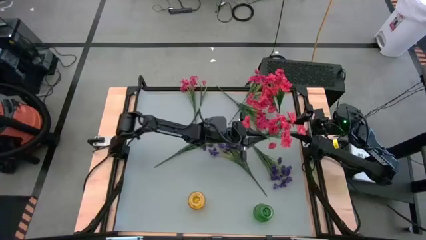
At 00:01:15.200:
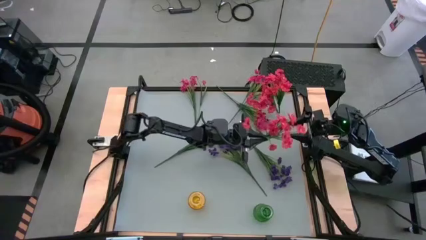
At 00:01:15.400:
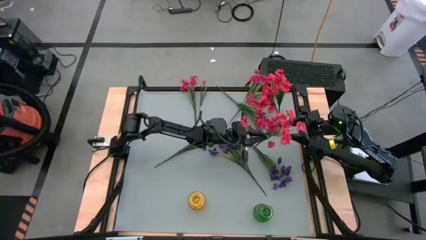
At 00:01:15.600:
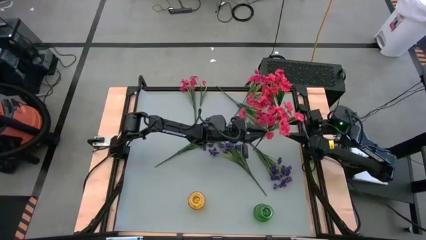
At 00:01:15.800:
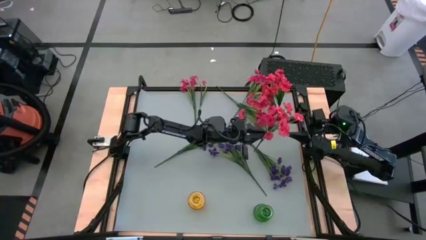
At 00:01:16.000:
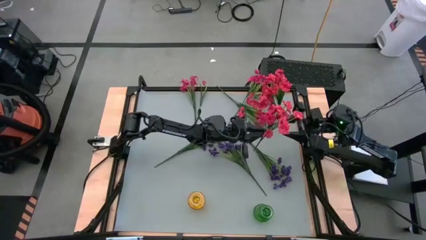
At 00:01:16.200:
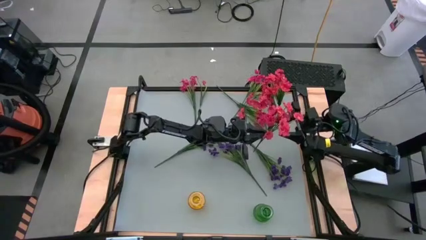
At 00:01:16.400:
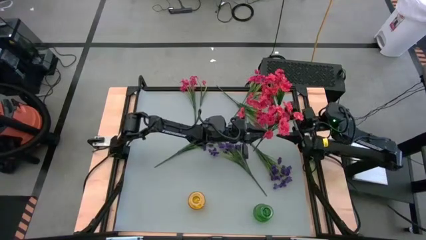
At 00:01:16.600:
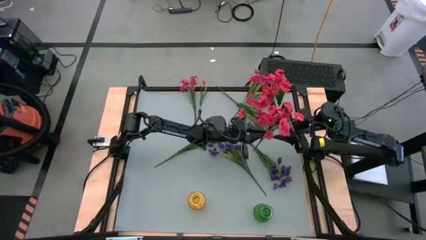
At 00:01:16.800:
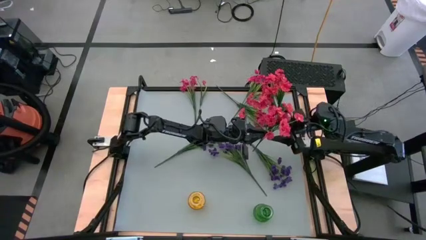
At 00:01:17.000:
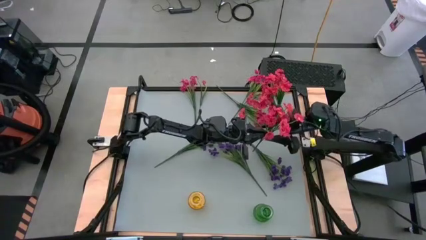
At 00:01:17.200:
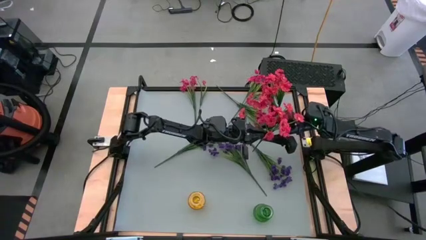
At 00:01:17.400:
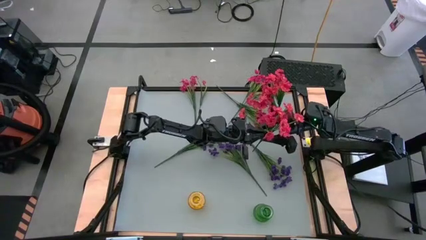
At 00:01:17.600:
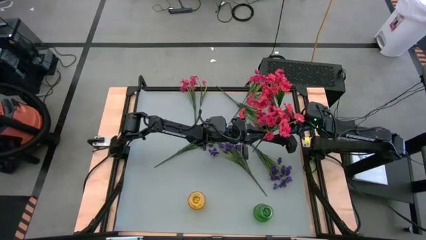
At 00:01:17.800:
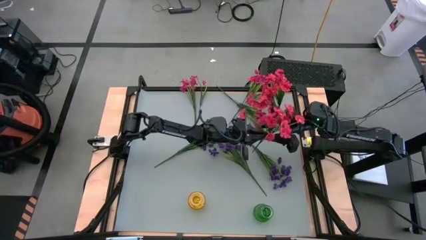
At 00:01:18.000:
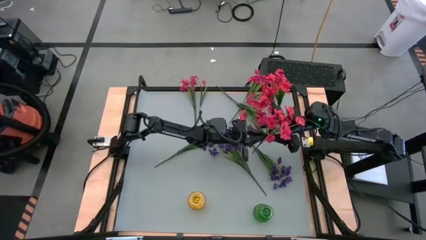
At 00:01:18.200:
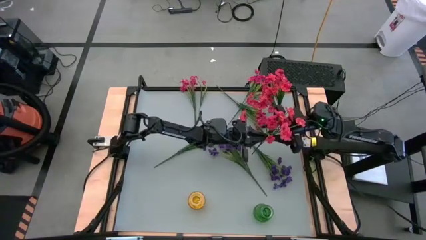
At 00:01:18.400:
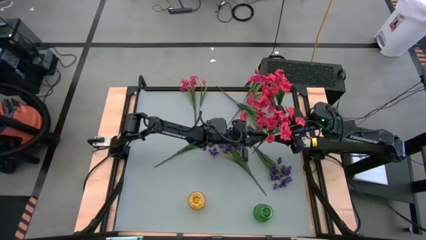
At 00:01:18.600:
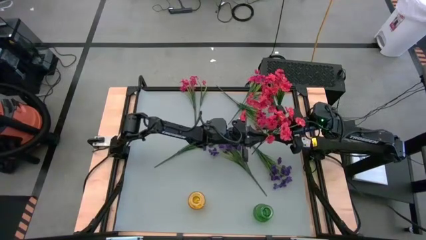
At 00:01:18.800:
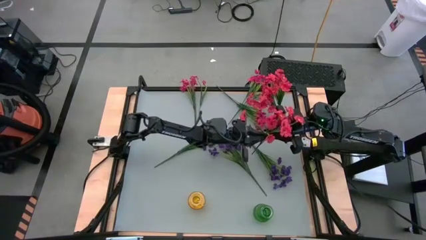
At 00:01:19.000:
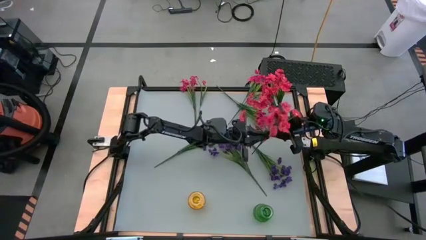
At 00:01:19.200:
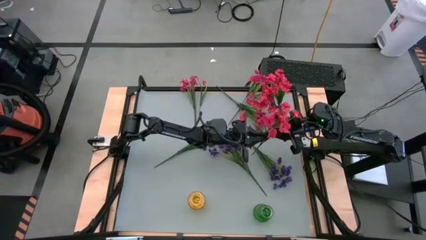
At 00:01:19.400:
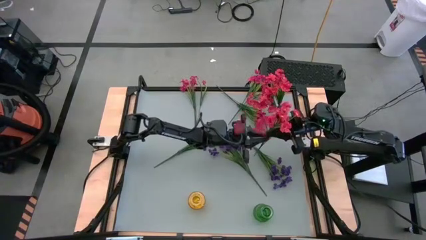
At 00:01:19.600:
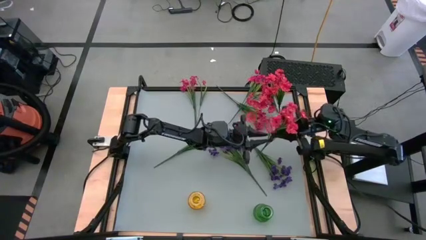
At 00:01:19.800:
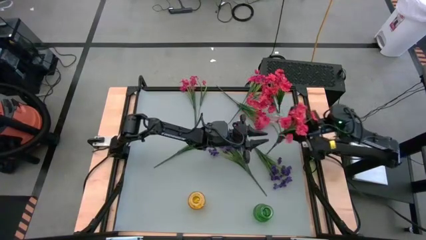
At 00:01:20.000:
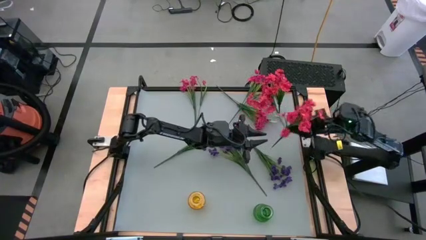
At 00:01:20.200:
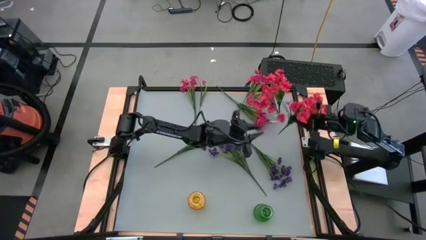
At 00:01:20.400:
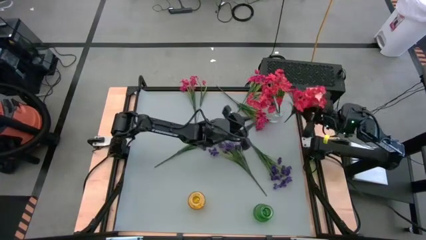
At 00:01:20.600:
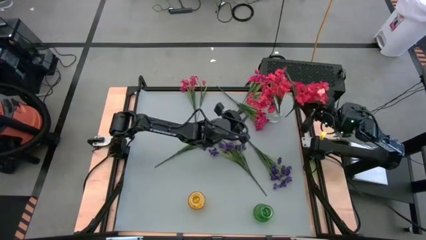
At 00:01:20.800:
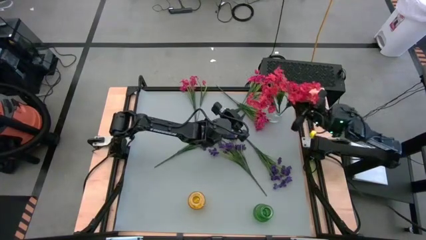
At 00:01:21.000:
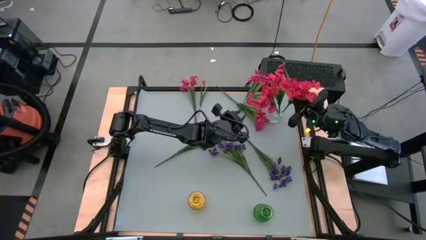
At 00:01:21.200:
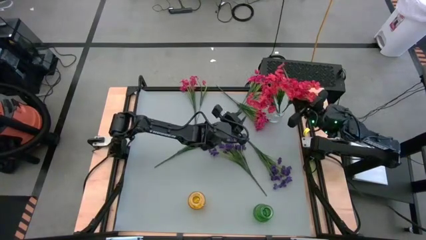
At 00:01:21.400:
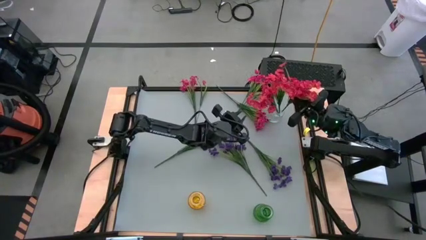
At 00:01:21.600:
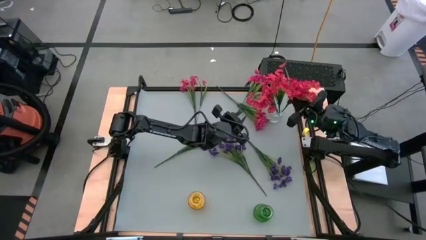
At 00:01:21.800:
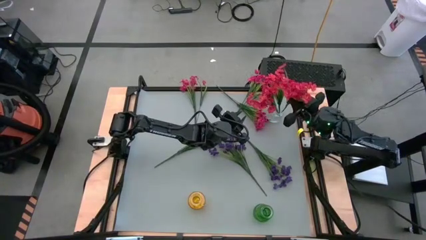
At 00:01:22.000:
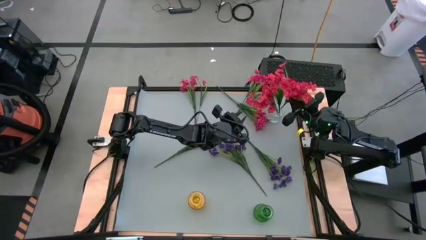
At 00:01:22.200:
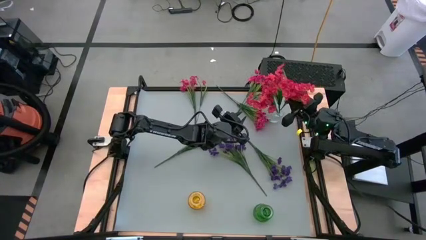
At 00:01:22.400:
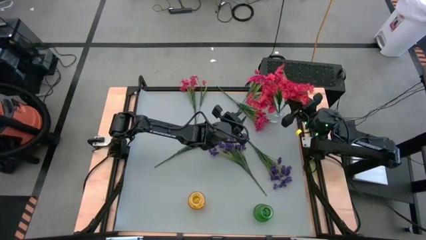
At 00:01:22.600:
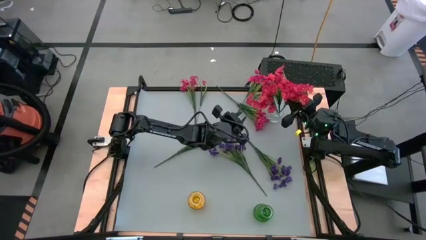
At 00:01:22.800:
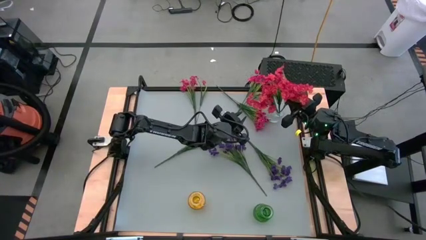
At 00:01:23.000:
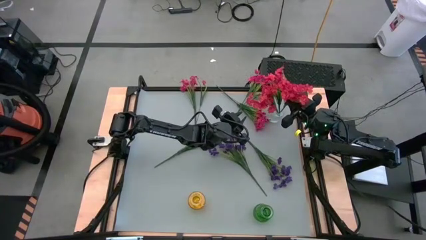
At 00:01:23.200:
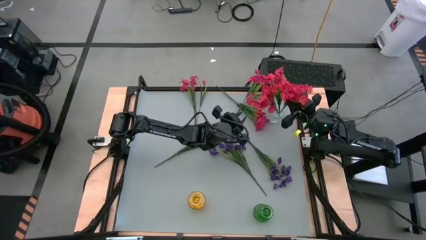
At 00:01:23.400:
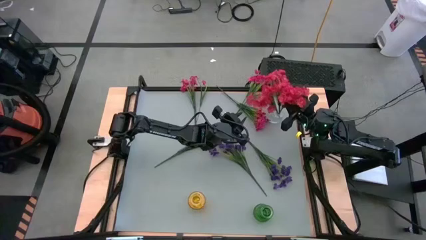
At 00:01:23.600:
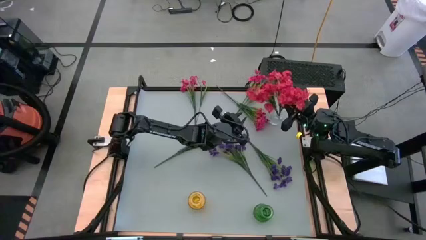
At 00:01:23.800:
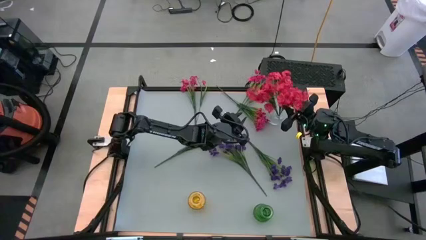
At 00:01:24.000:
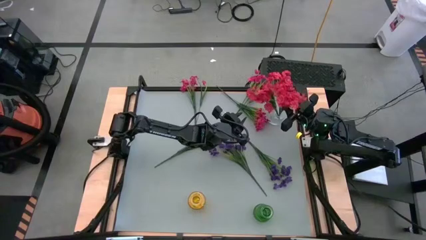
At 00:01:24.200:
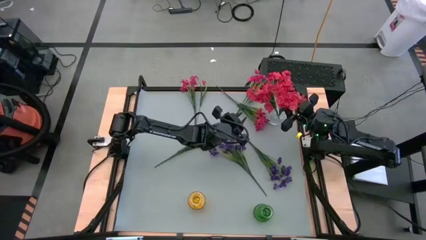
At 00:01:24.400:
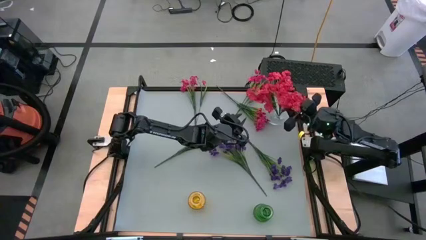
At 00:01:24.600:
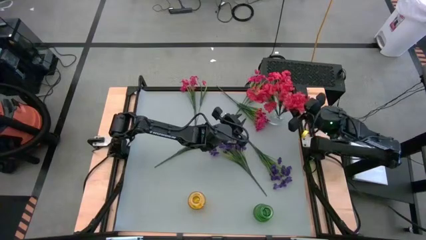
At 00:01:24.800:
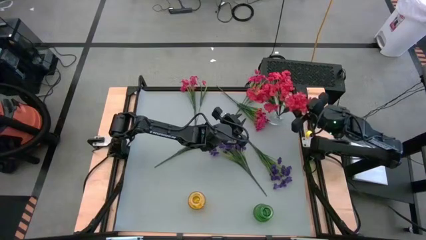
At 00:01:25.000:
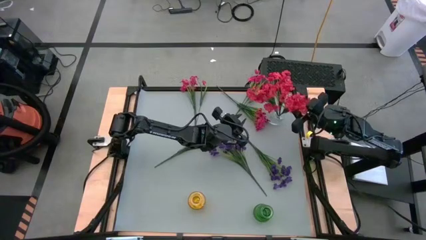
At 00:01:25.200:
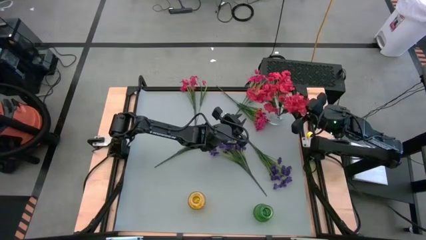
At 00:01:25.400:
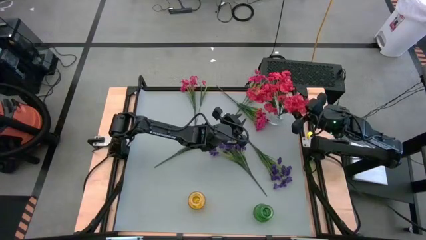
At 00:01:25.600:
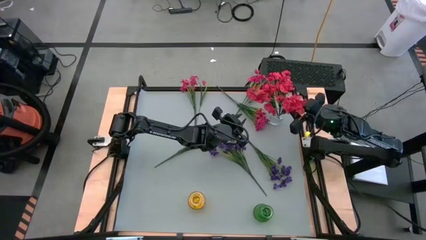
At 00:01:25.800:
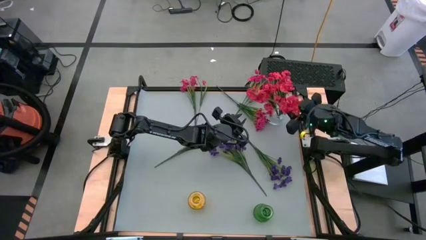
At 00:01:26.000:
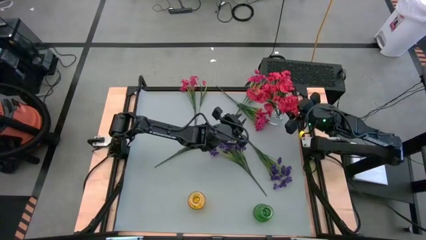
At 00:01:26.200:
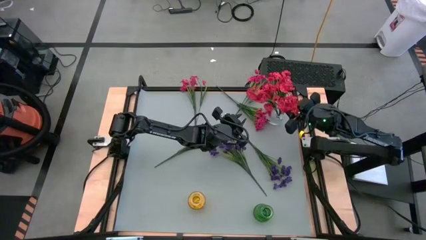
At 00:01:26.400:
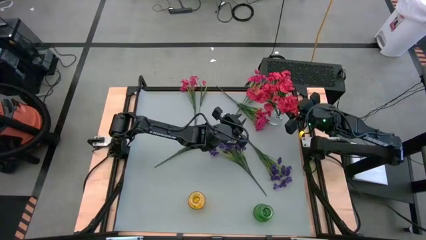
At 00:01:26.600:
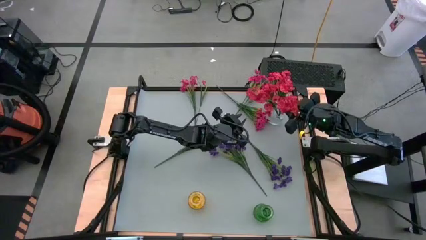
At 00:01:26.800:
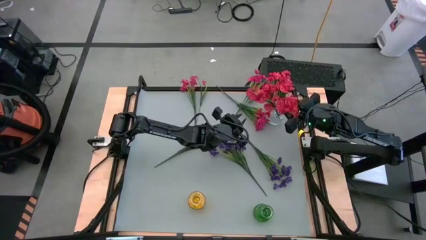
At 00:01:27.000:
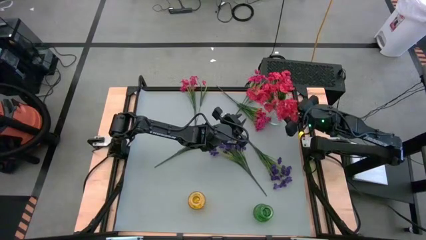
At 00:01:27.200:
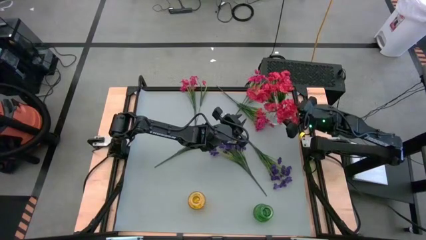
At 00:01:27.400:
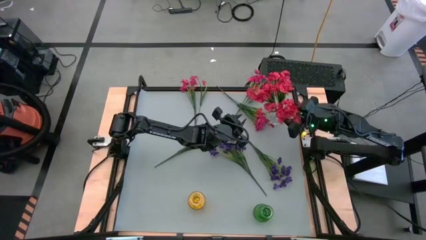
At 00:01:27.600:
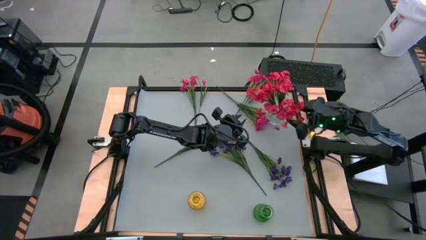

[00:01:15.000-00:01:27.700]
Task: Sort flowers into vase by color
Put the red flower into the transparent vase

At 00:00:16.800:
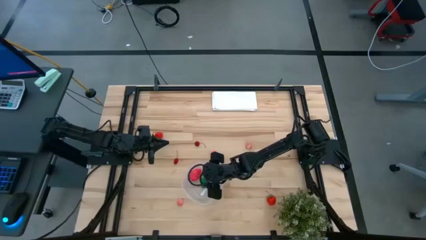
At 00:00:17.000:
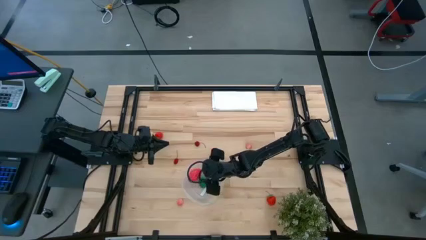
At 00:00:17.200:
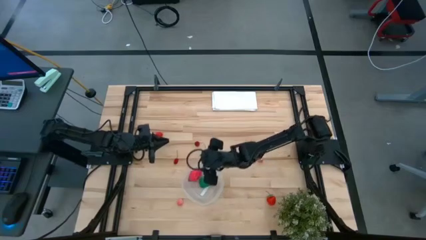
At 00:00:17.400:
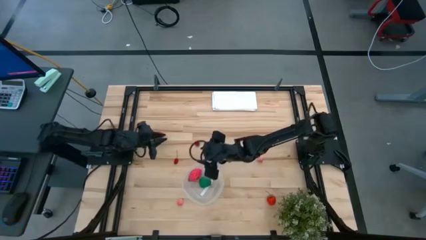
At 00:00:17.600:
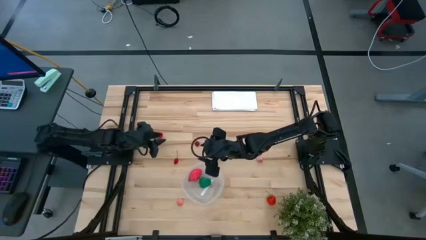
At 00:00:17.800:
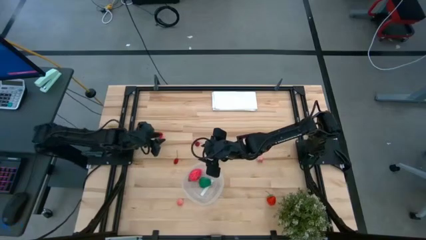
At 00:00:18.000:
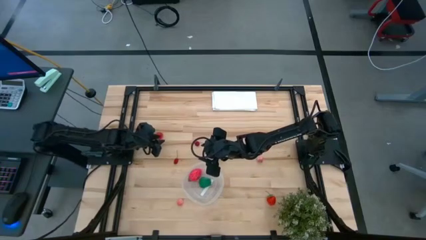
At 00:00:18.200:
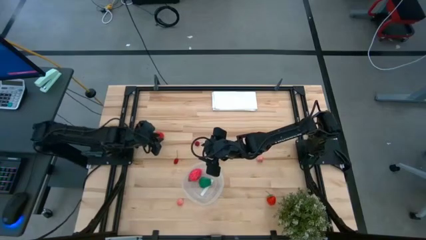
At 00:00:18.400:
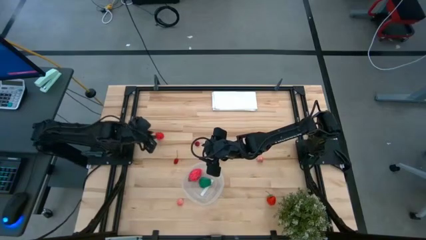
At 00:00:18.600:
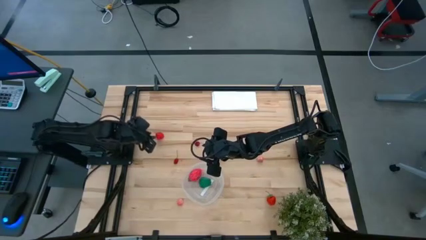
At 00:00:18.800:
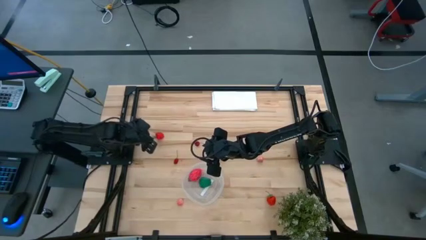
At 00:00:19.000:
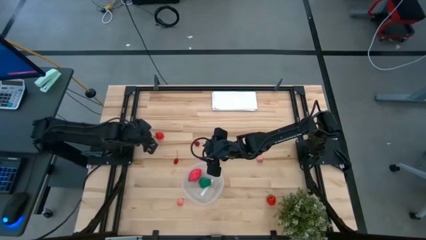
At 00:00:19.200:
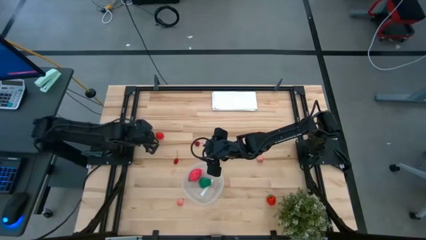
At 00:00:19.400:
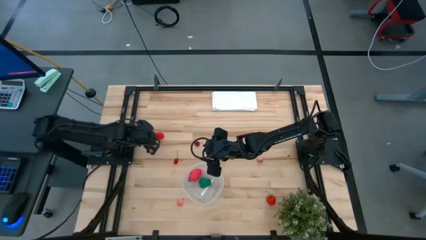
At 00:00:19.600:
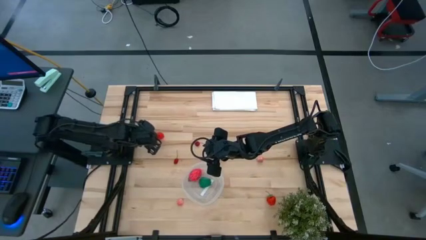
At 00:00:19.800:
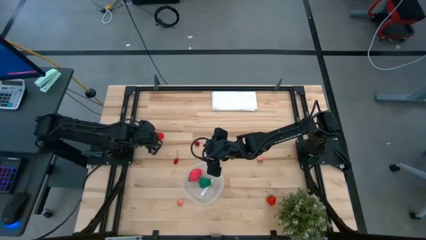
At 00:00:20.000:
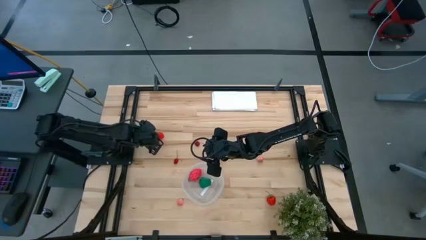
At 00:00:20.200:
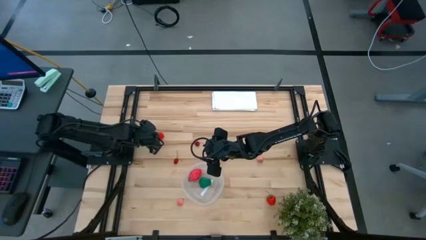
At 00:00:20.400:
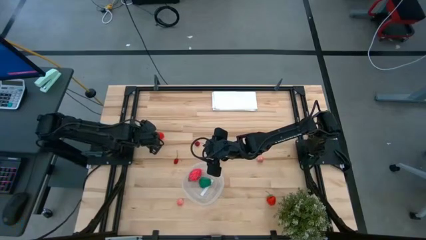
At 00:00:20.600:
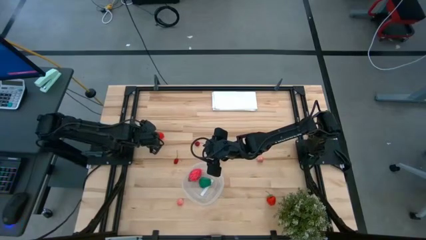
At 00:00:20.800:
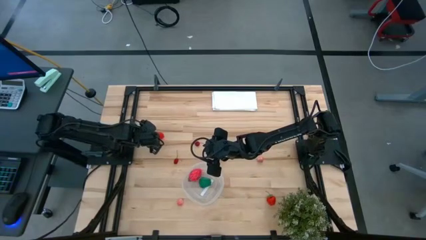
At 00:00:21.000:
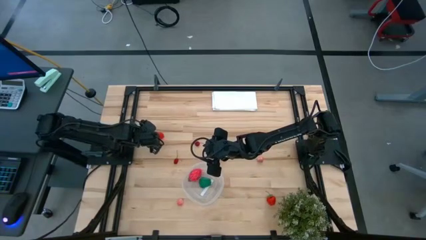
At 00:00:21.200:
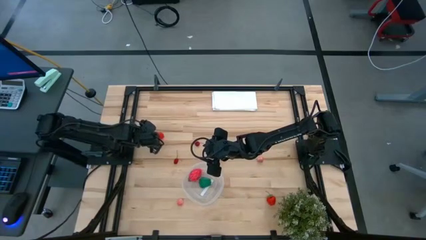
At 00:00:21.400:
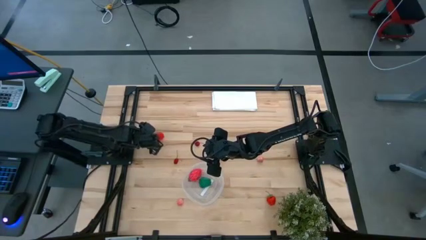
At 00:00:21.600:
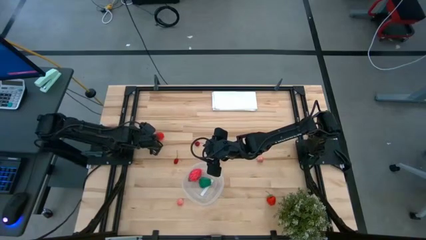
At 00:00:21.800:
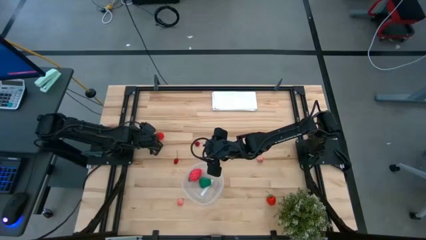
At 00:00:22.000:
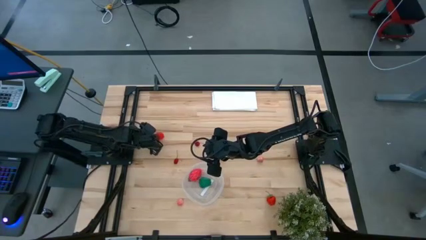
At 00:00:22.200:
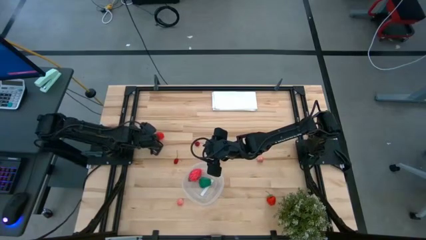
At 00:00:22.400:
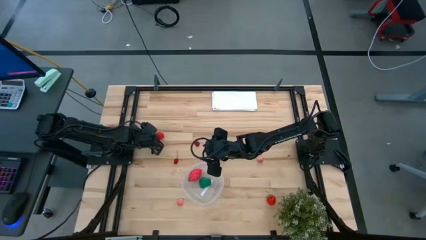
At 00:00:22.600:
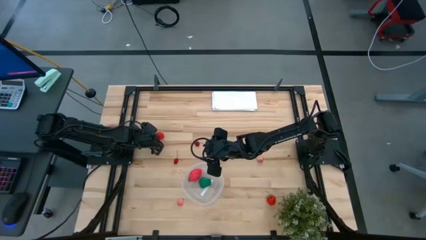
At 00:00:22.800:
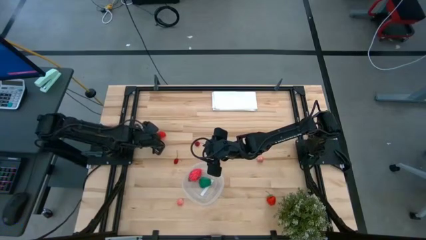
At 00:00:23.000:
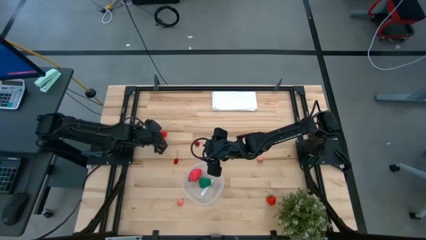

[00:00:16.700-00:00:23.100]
Task: Pick and placing Produce into tupperware
Put the red strawberry into the transparent bin
